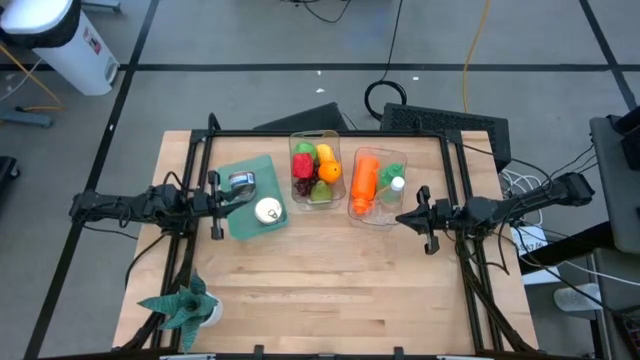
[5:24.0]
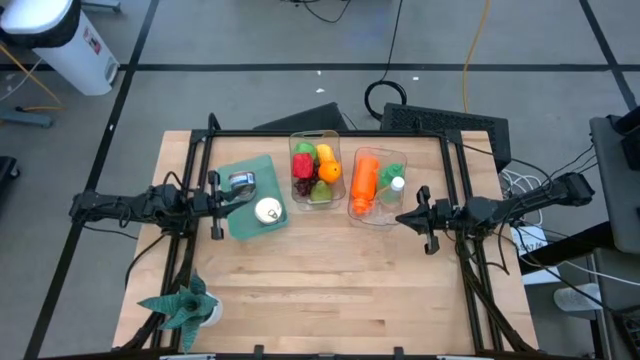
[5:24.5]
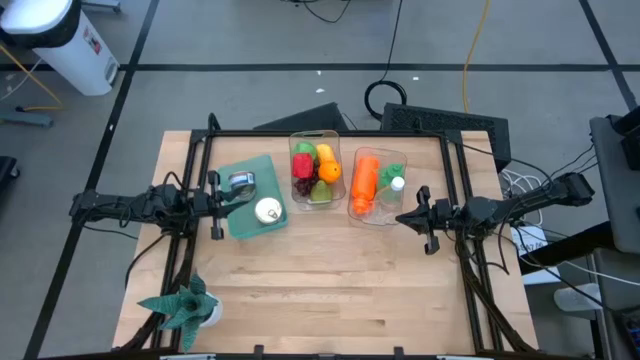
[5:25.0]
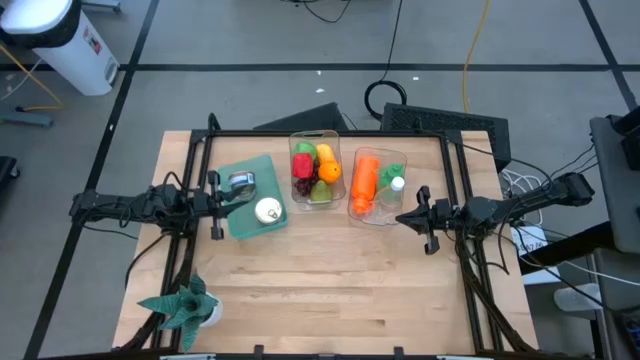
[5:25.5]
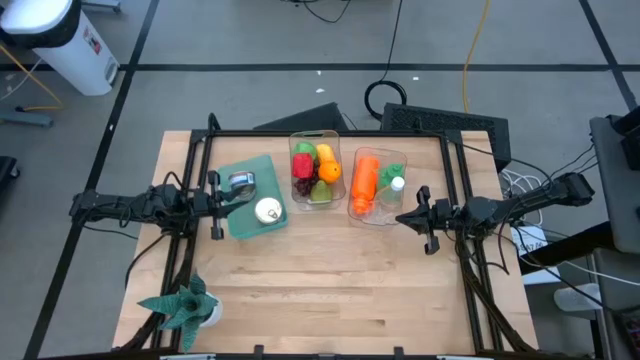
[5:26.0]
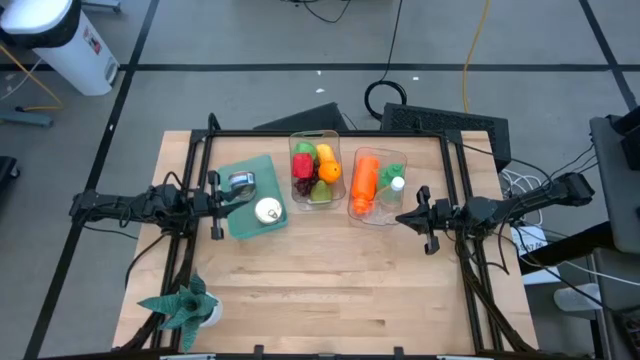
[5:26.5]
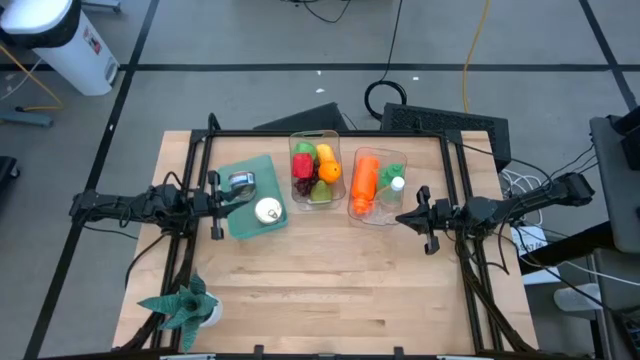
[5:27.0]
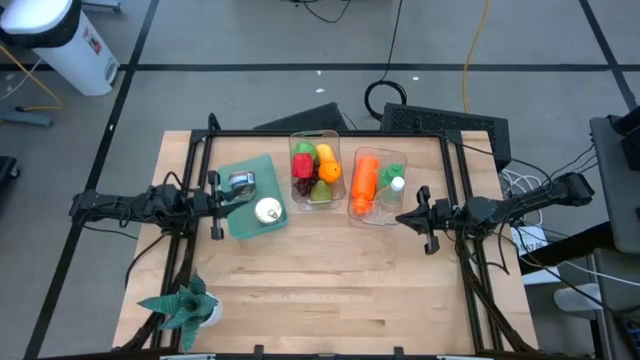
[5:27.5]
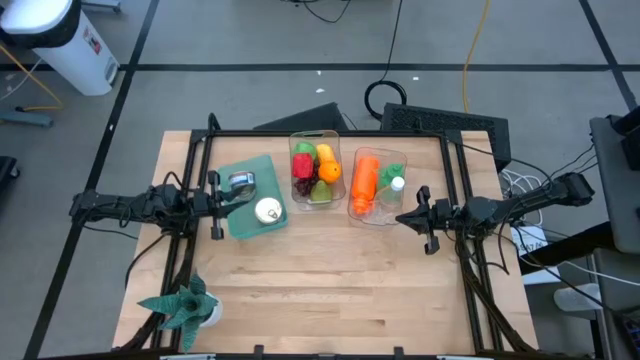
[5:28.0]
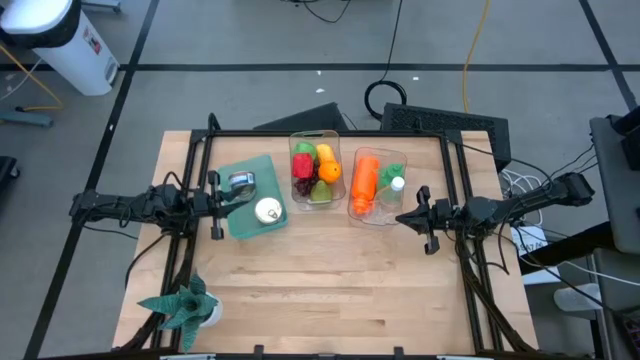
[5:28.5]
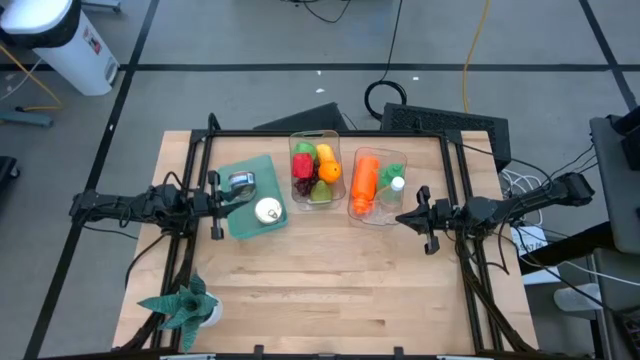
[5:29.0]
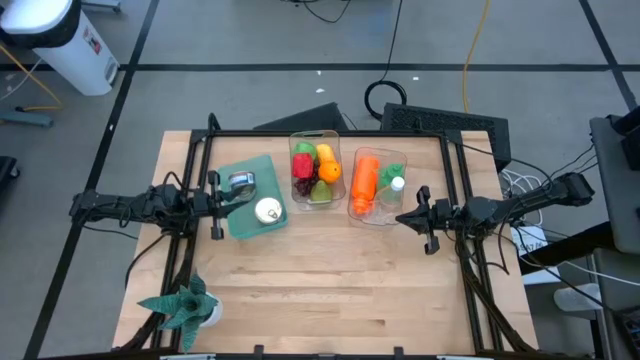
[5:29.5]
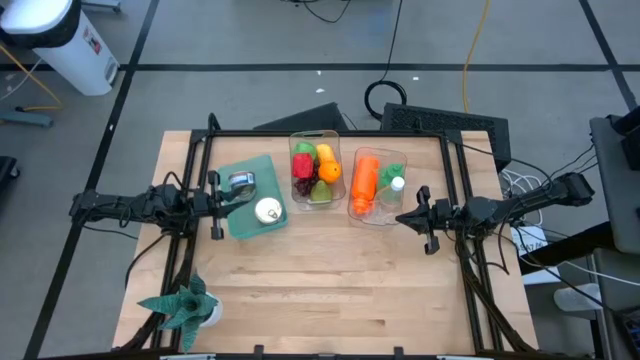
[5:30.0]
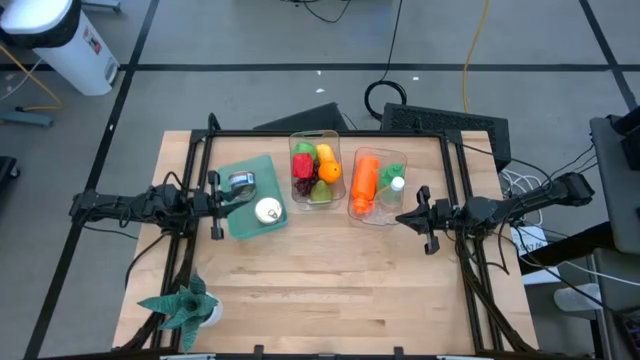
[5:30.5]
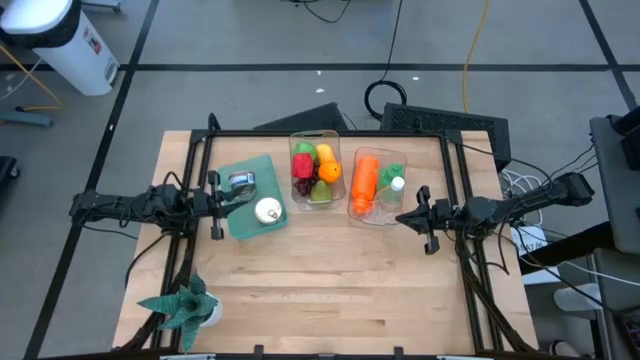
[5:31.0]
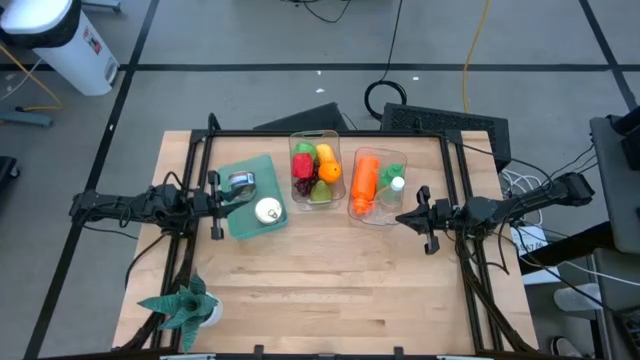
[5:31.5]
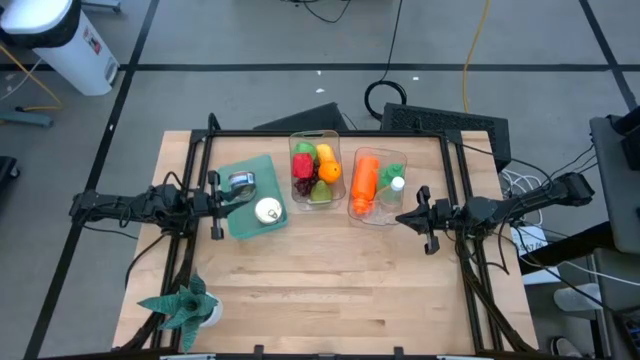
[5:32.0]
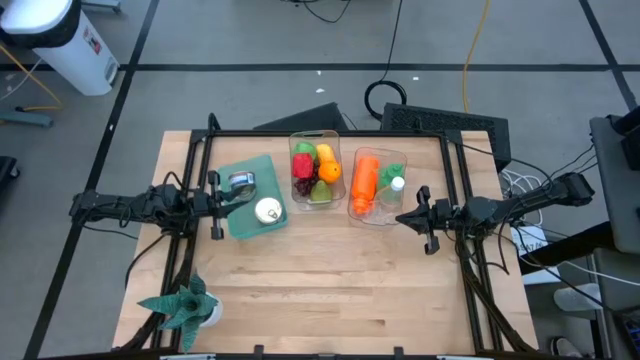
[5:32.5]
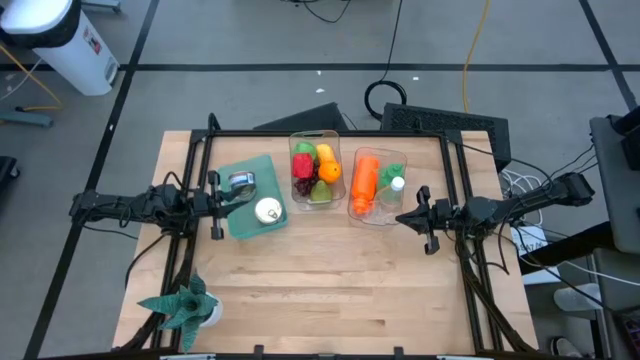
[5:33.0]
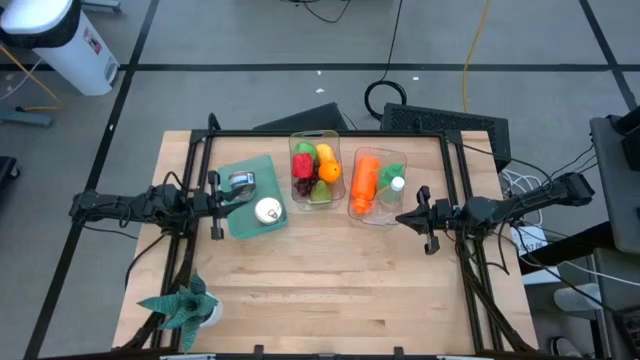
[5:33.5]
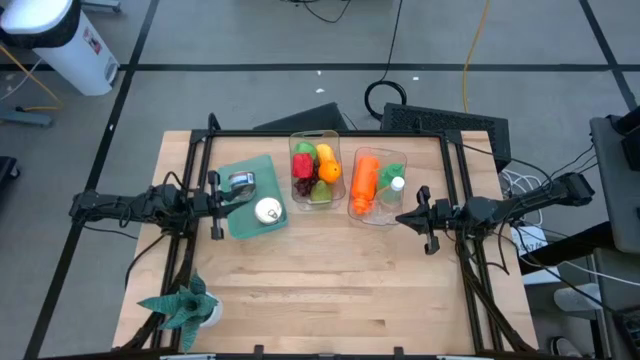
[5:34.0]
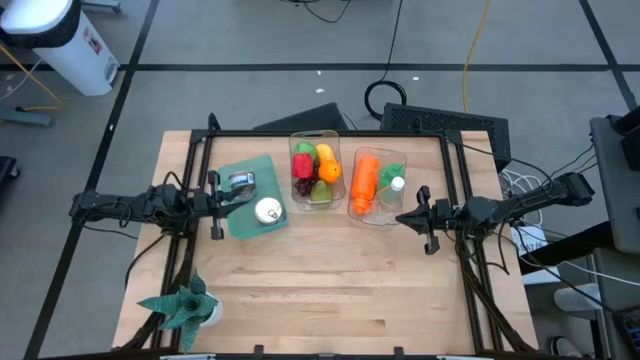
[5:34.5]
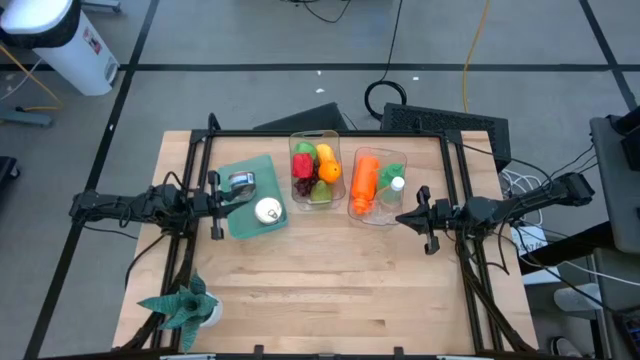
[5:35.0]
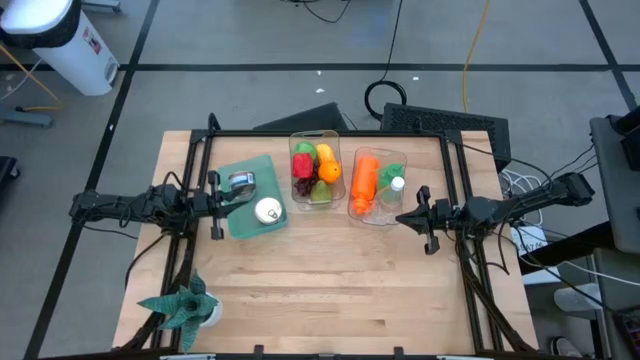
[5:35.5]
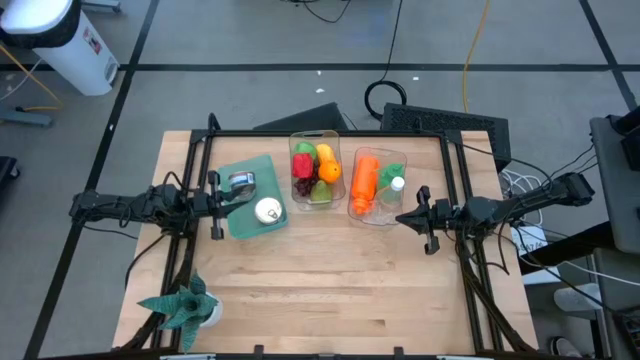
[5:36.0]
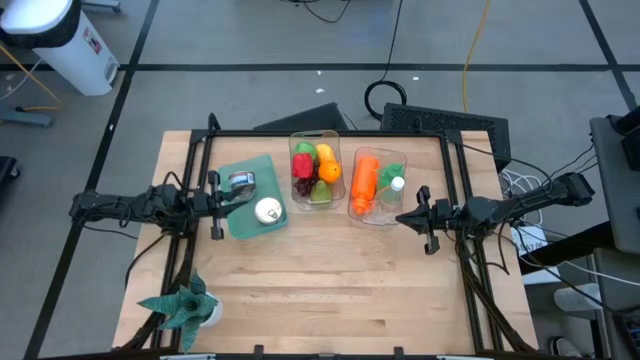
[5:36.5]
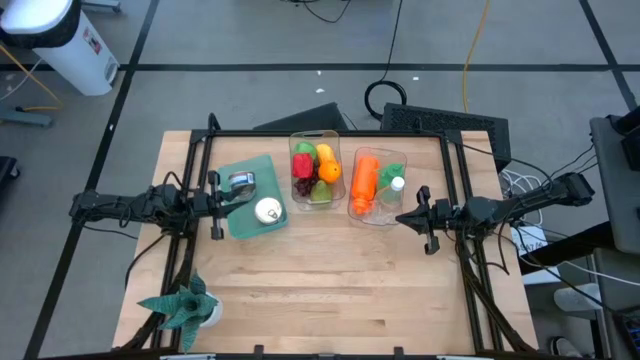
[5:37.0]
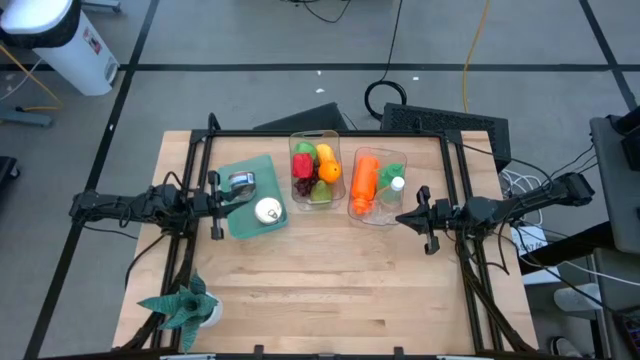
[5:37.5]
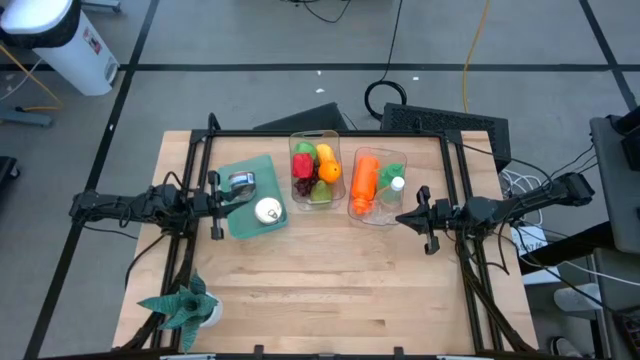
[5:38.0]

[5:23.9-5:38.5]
Task: Pick & Place Food Item
Return to Home Position

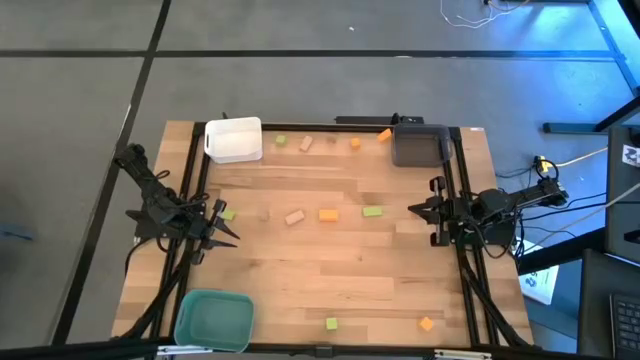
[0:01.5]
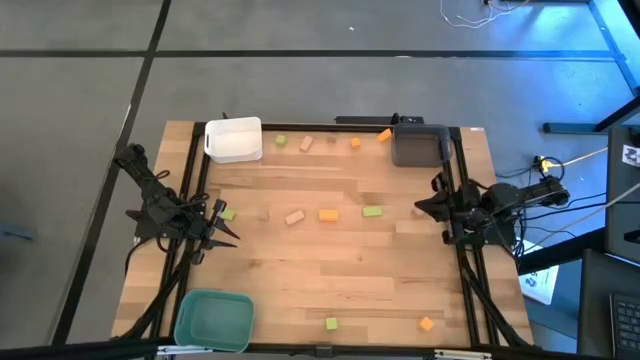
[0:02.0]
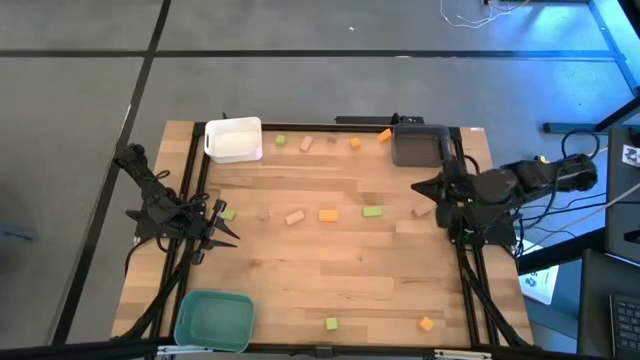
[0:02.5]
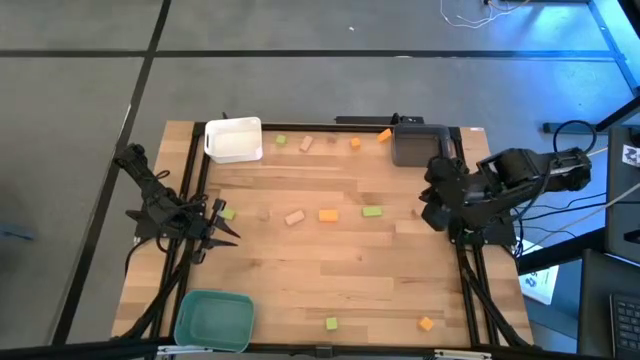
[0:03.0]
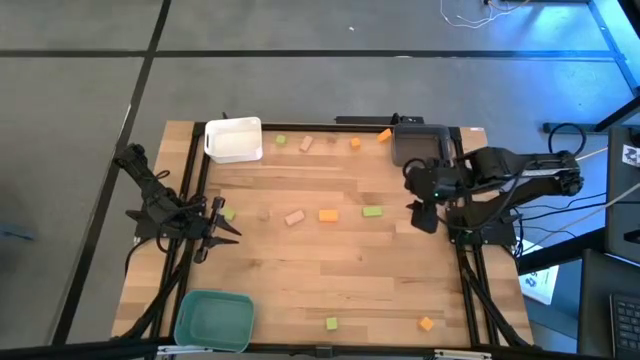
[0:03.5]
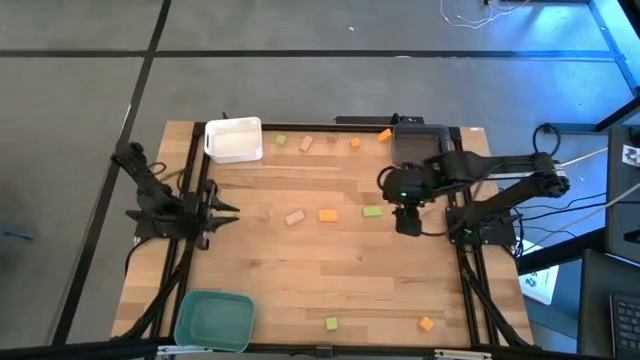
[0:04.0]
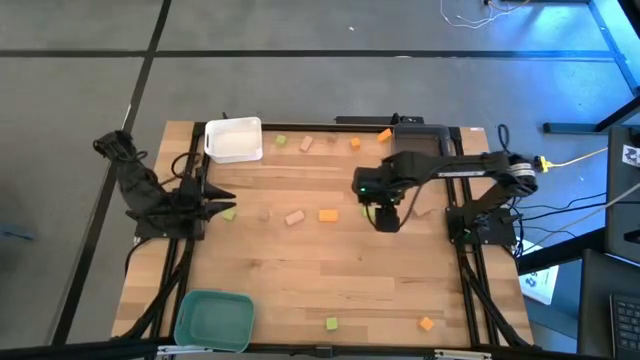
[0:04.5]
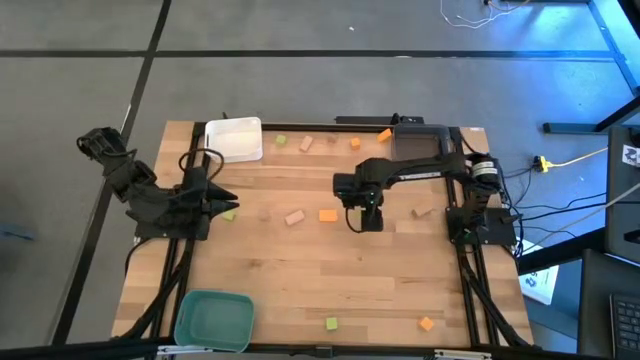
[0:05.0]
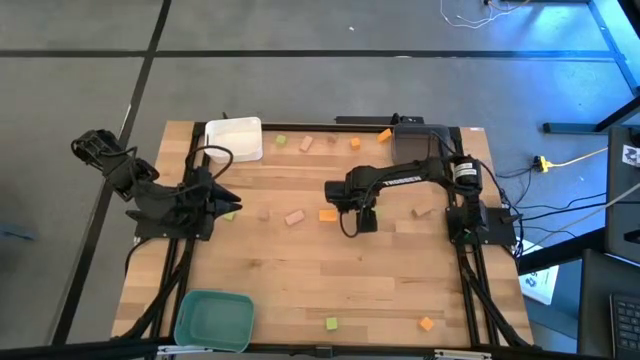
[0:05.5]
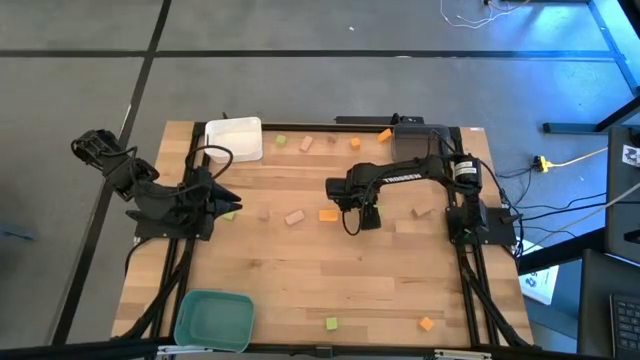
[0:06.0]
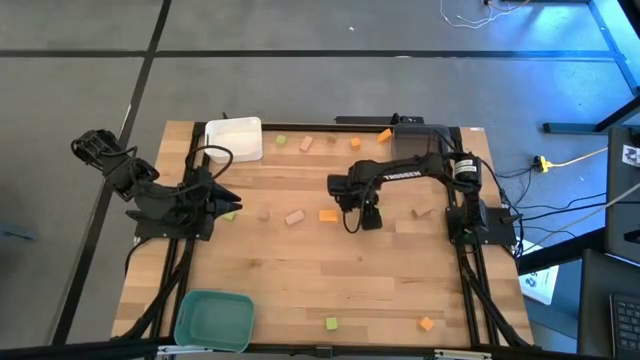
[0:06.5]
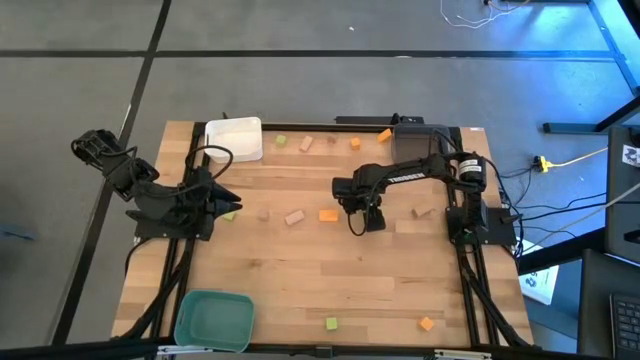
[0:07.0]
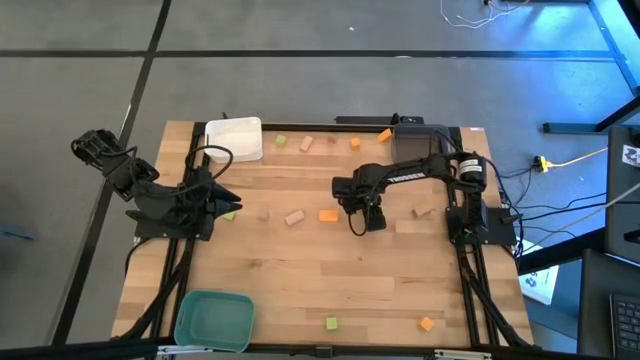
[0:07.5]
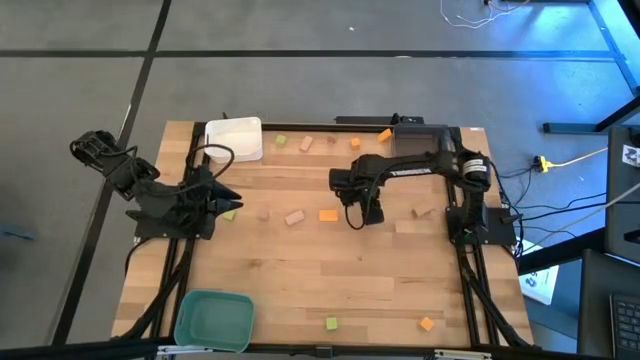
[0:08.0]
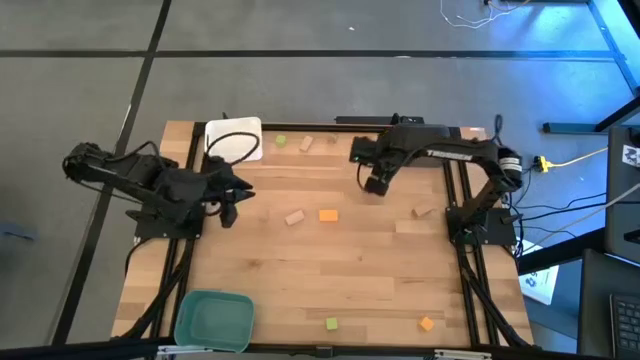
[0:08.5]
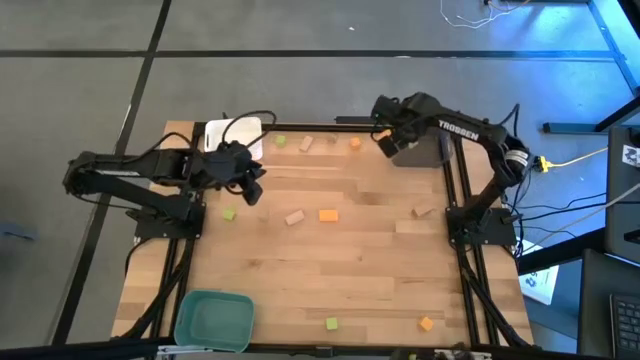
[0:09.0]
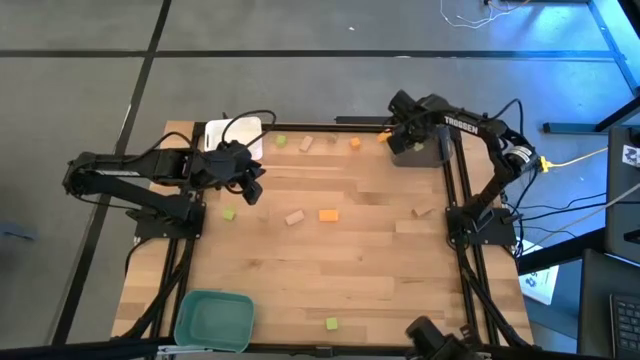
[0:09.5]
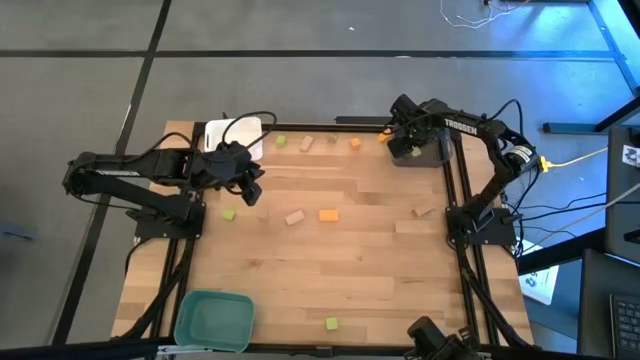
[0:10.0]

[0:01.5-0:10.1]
Task: Sort & place blocks by color
Put the green block into the black bin
